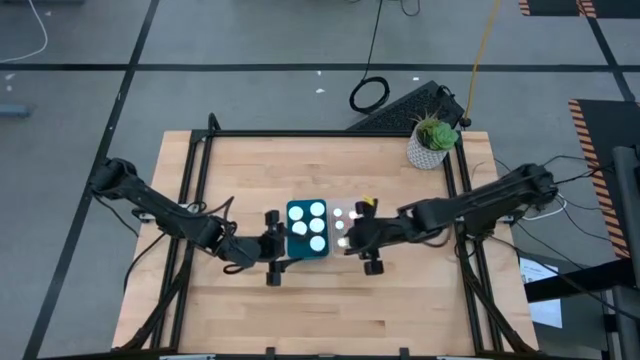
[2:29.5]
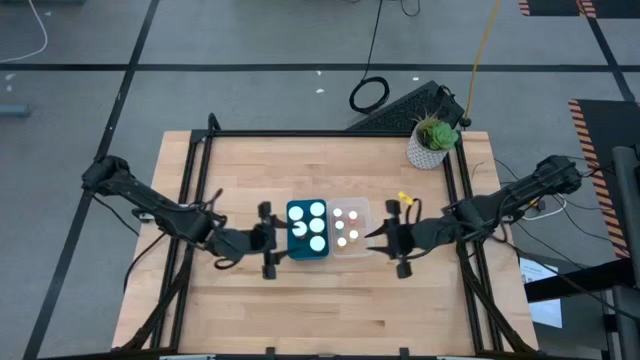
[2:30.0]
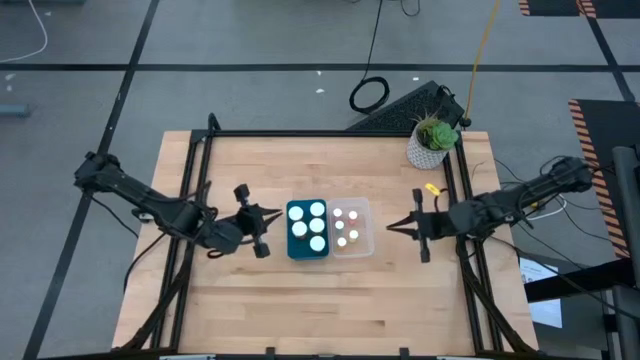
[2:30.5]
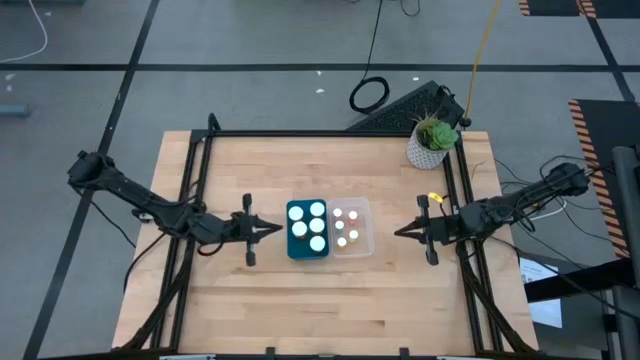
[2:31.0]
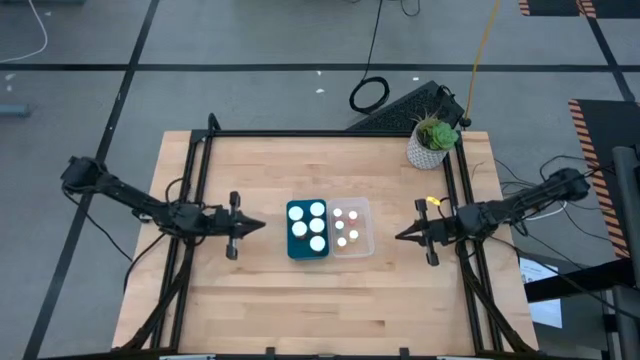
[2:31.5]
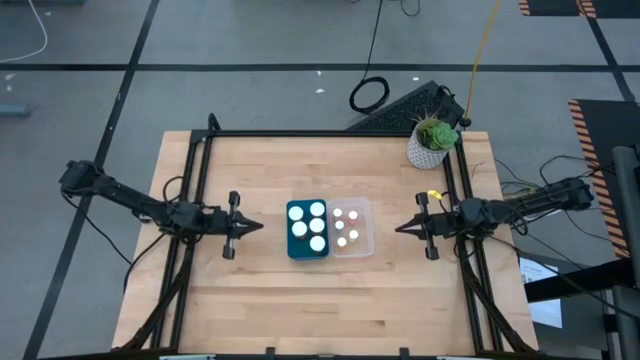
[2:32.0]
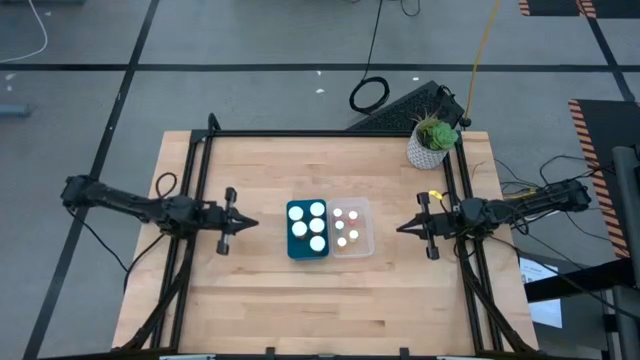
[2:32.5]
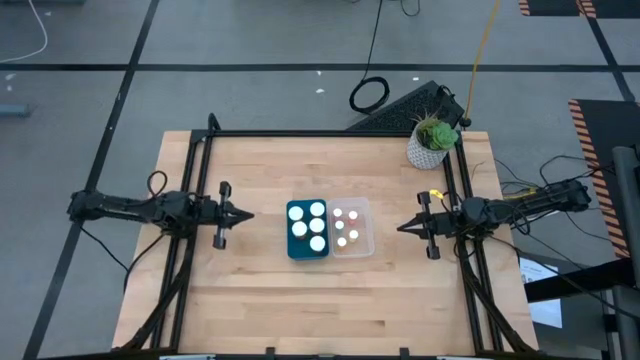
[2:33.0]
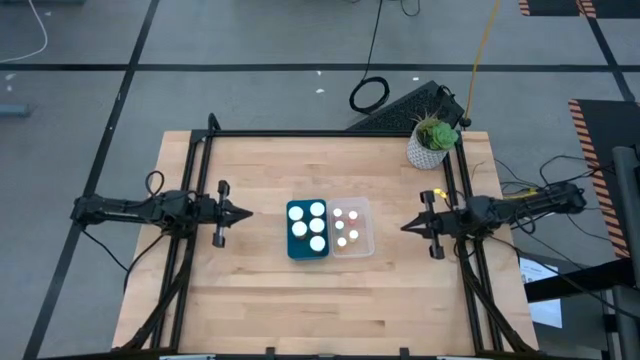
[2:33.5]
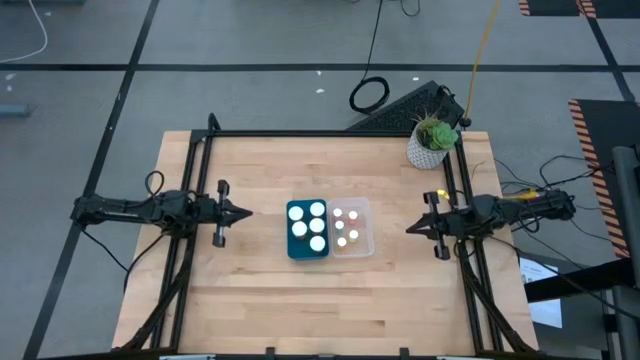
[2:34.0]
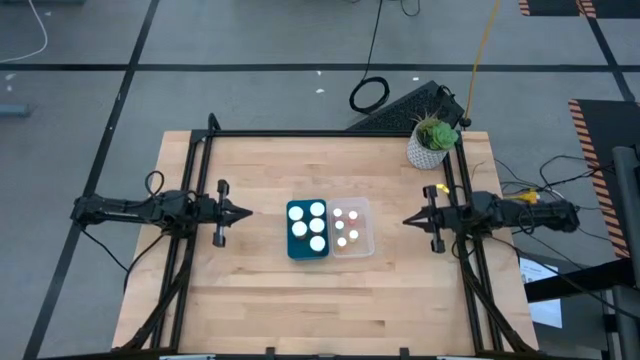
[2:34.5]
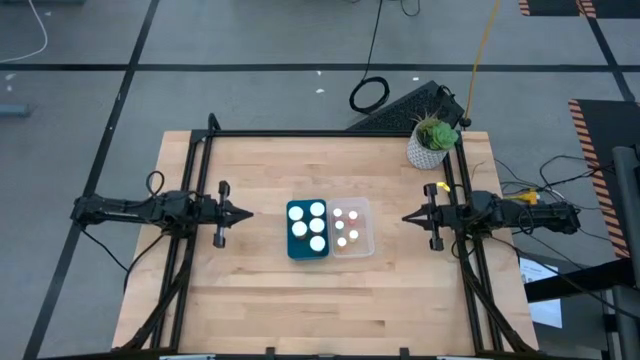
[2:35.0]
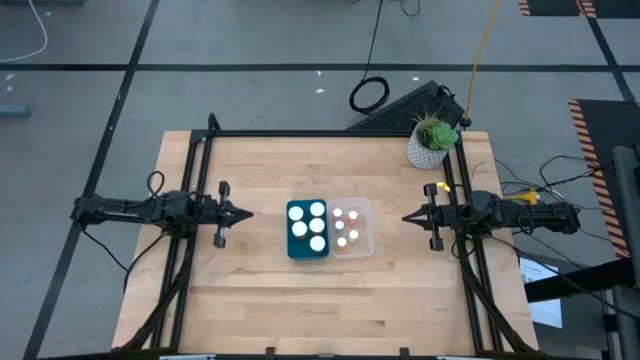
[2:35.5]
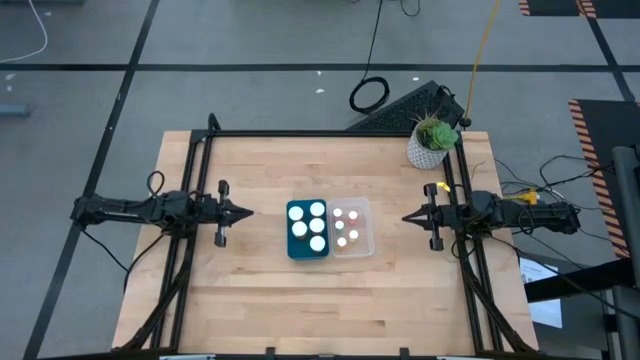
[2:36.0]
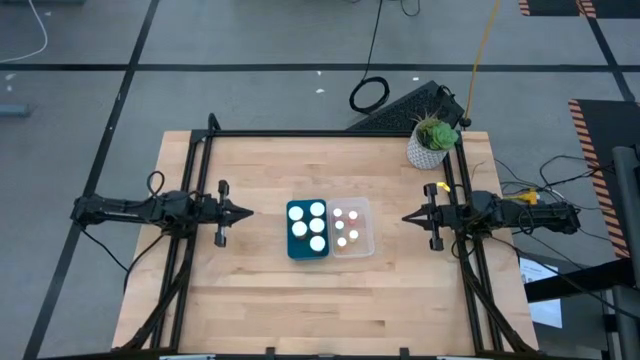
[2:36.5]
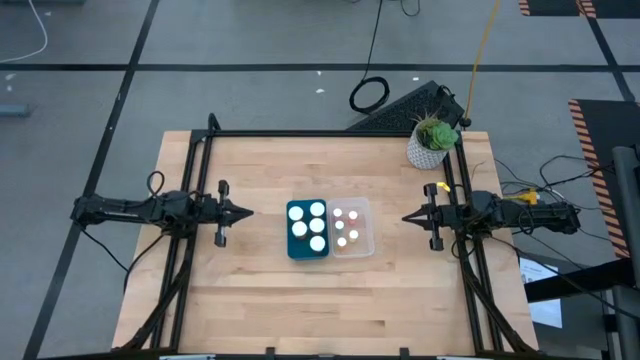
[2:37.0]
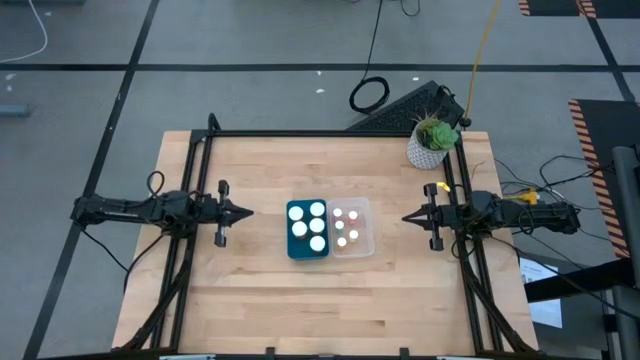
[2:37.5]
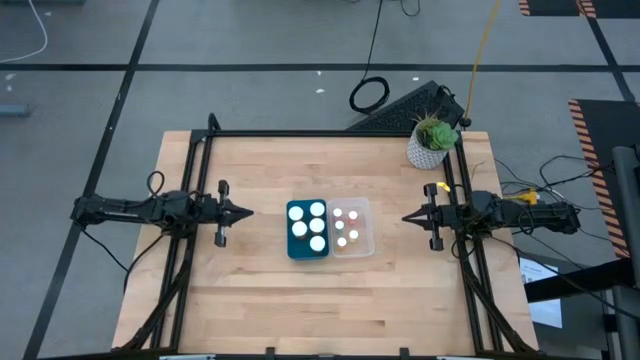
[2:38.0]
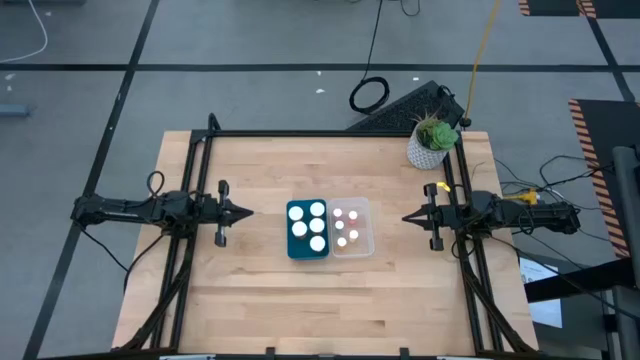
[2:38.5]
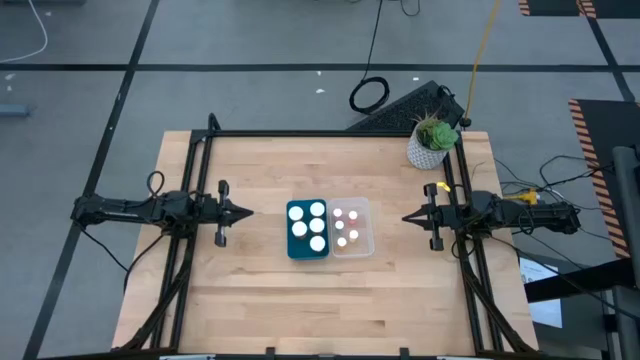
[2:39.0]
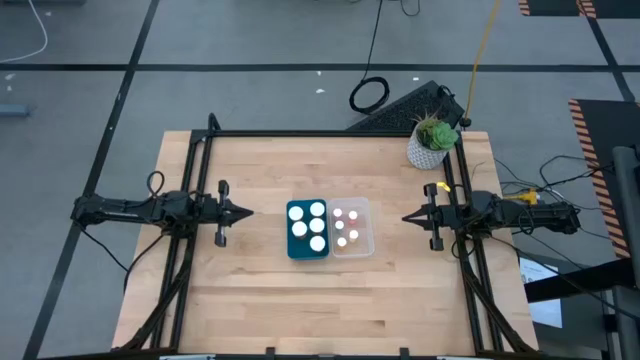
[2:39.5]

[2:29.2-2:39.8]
Task: Pick and place medicine bottles into bin by pill shape (circle, oval)
Return to Home Position

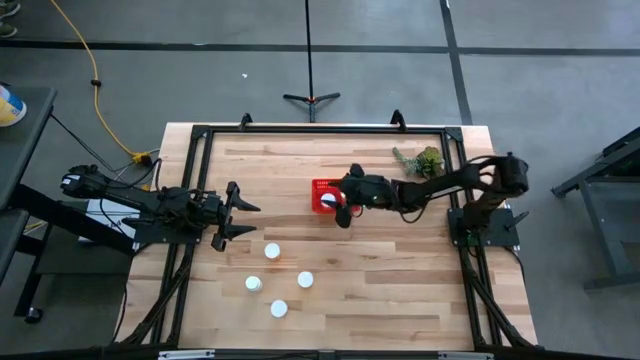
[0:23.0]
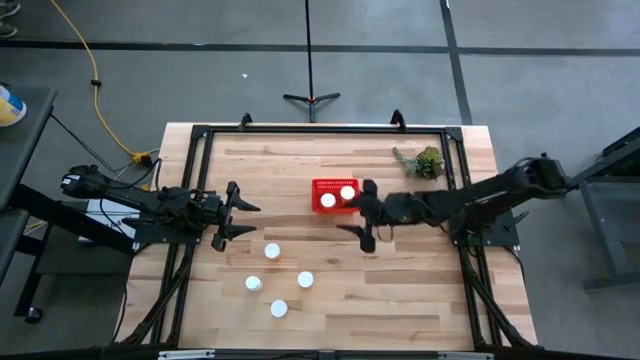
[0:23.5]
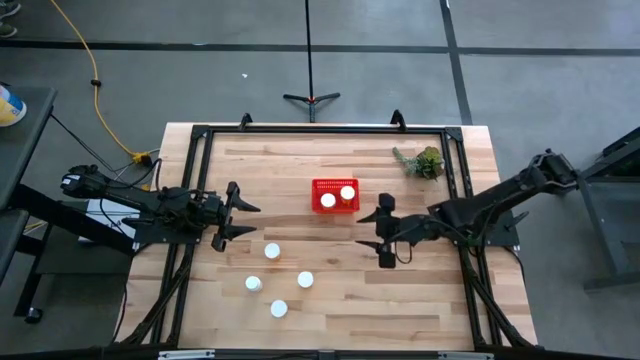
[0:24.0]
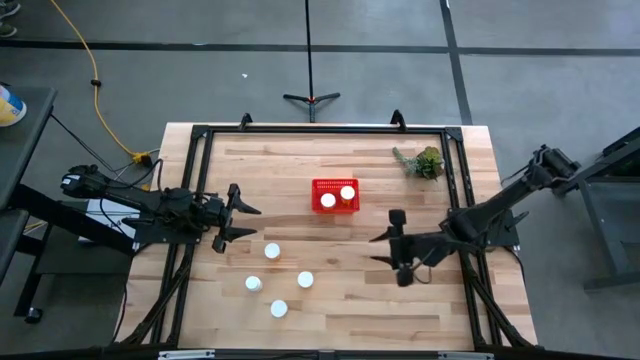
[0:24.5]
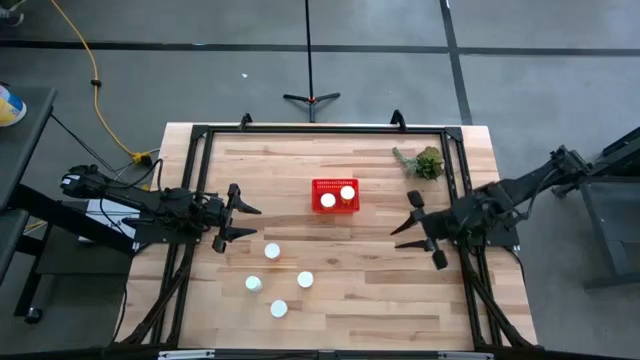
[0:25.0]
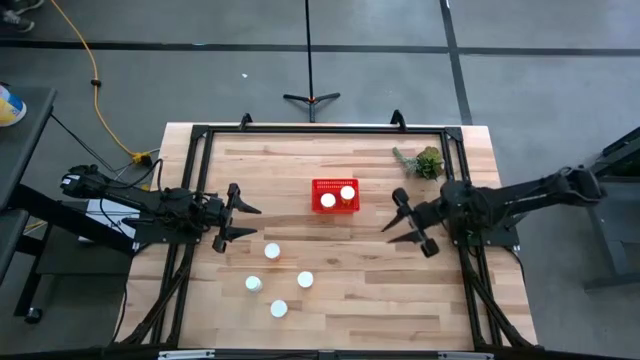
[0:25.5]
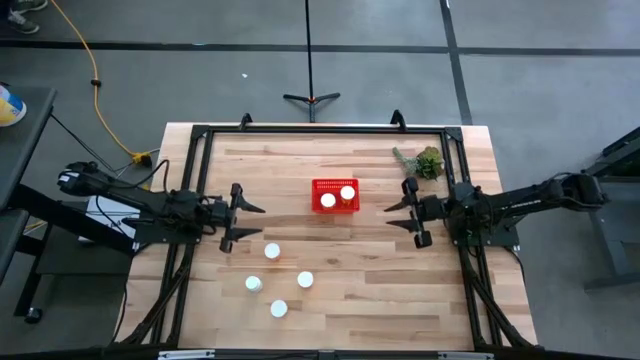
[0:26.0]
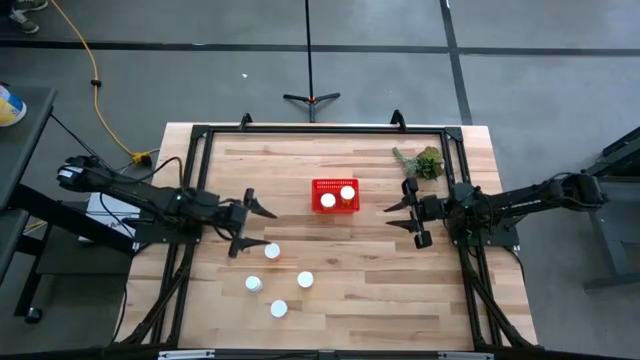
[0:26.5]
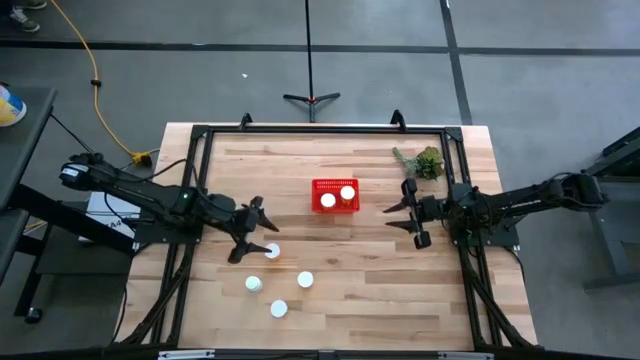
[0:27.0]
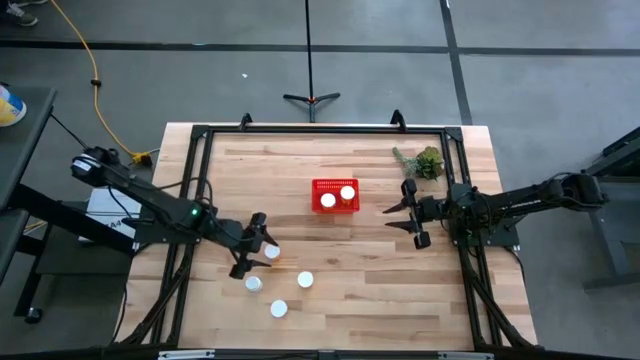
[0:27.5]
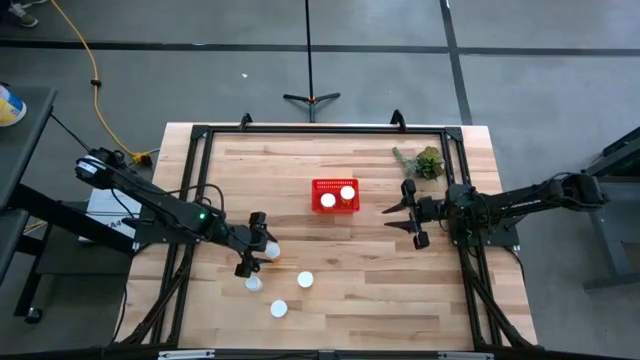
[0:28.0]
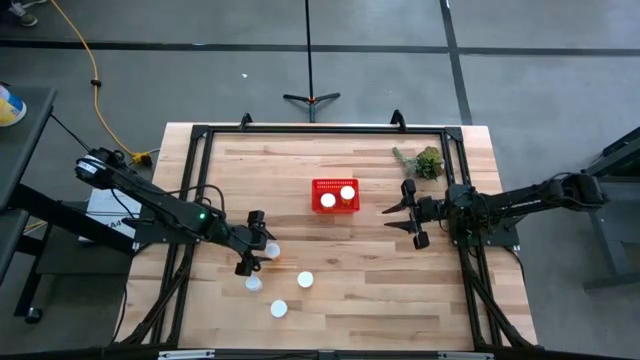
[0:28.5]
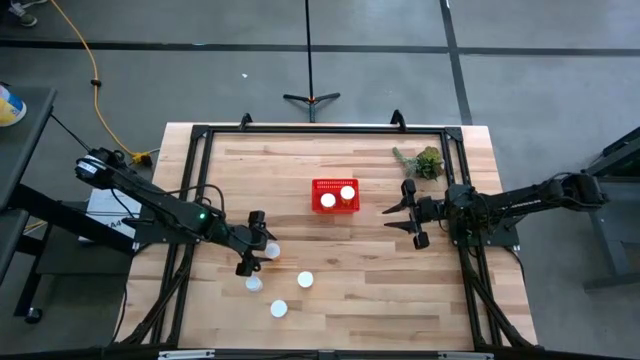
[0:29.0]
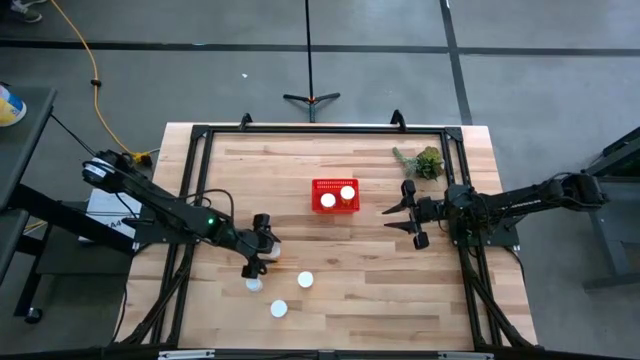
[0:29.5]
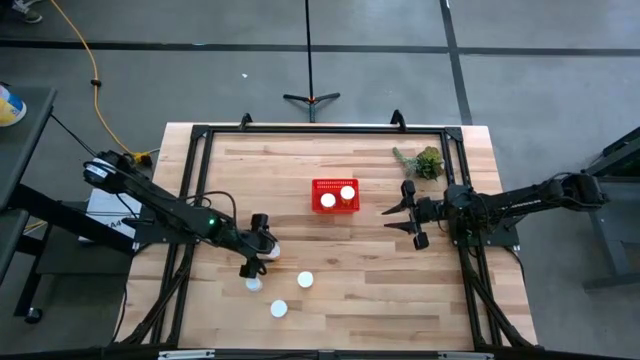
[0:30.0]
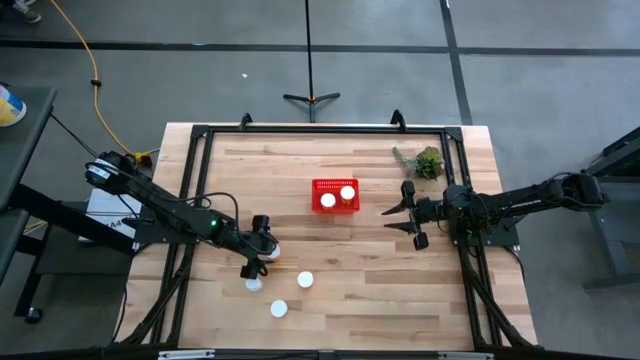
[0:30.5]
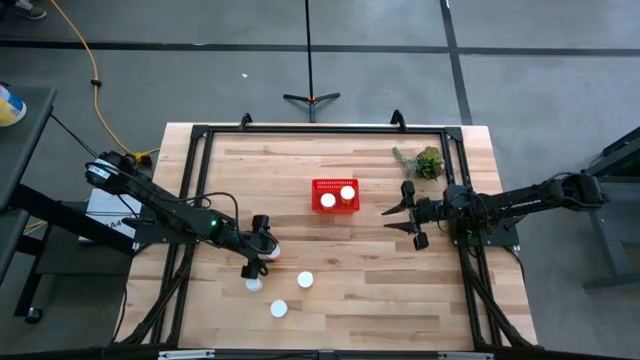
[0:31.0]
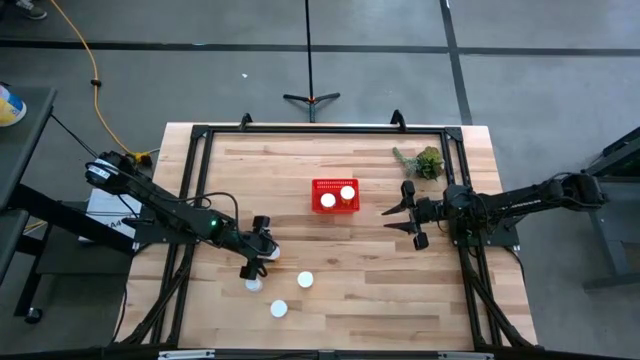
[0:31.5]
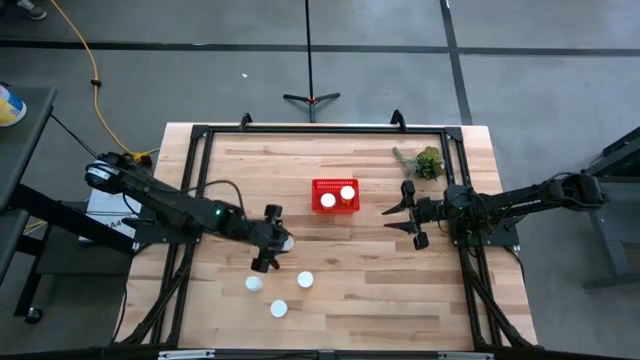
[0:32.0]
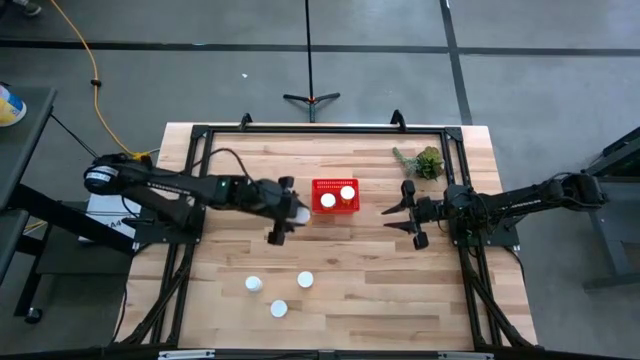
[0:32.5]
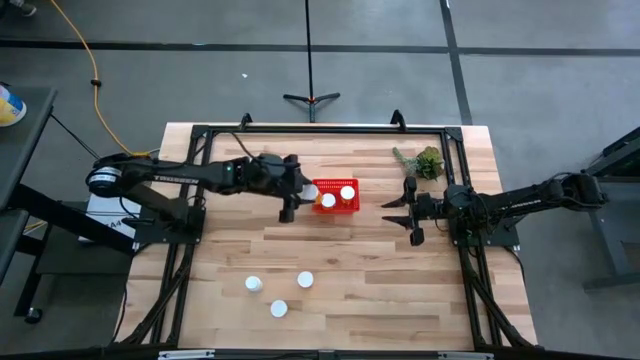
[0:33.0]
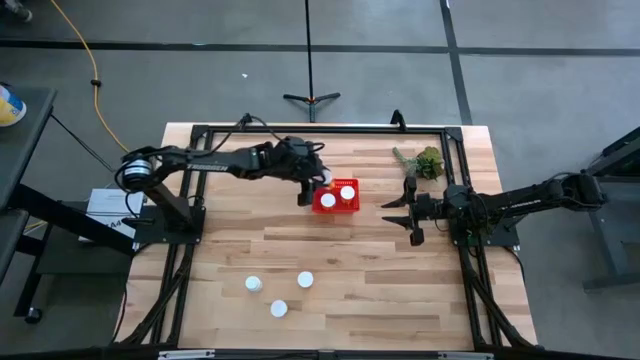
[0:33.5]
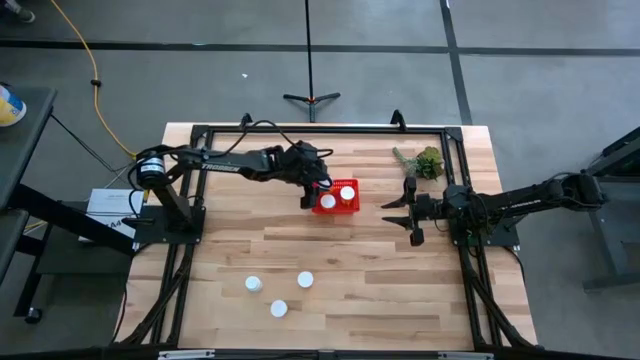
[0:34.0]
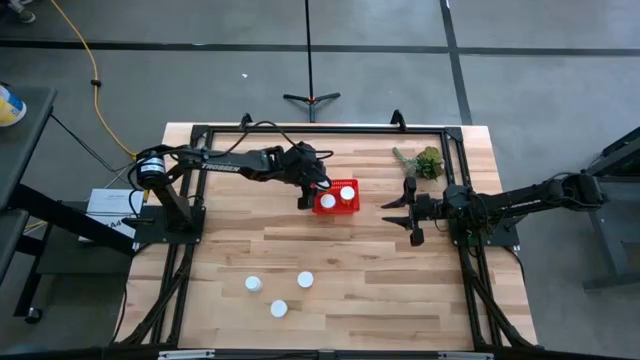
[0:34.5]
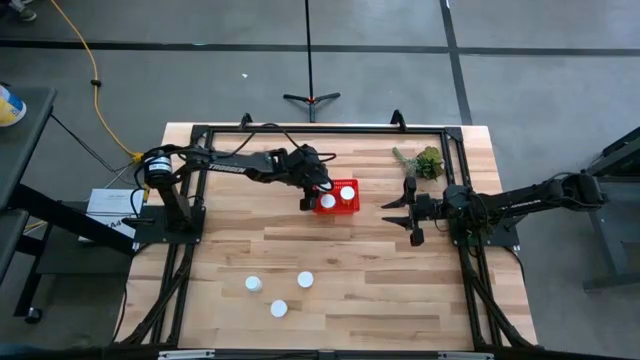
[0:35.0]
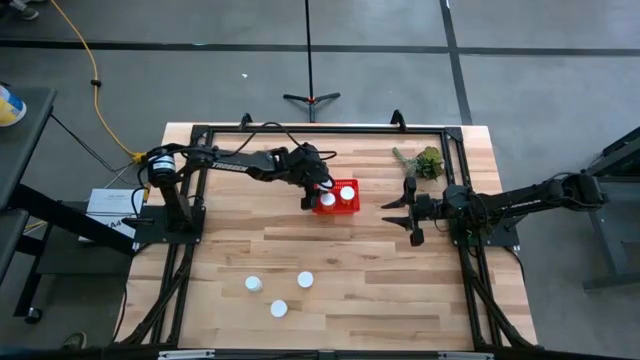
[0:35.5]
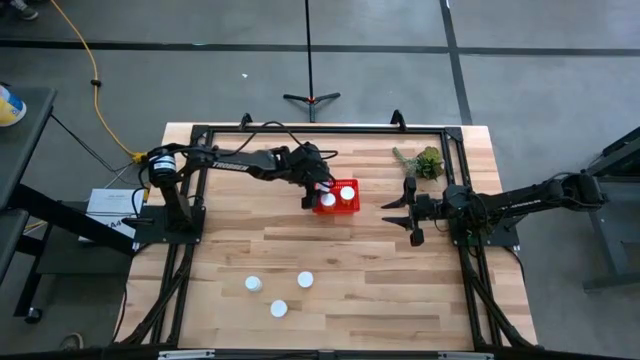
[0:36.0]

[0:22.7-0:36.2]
Task: Pick and place pill bottles into a basket
Put the orange pill bottle into the red bin
